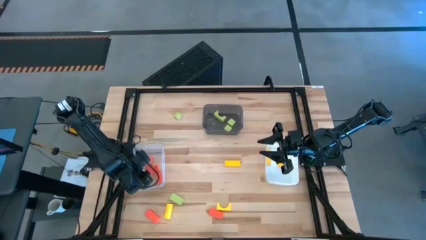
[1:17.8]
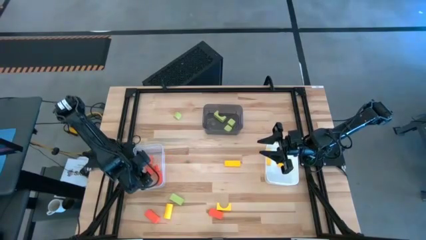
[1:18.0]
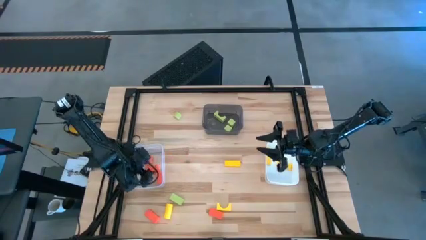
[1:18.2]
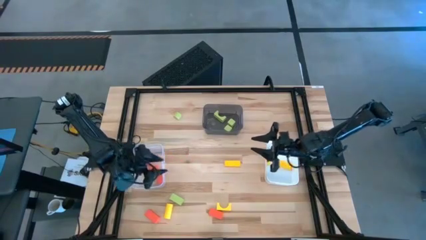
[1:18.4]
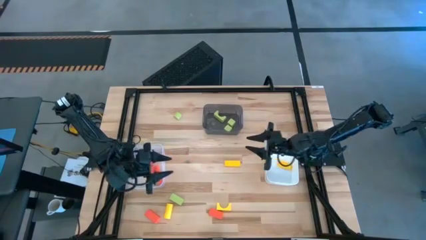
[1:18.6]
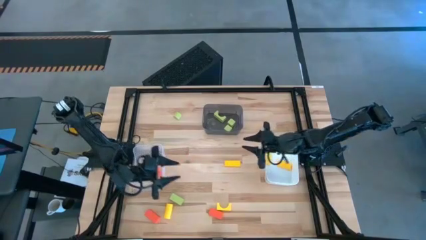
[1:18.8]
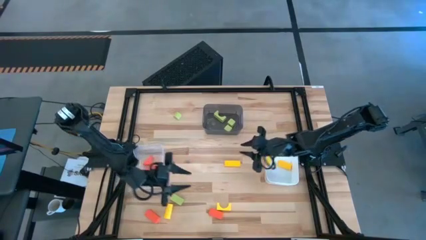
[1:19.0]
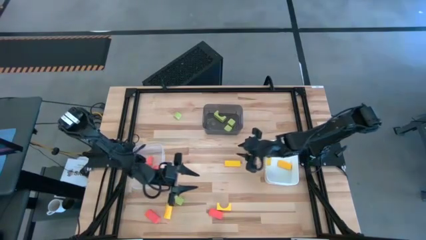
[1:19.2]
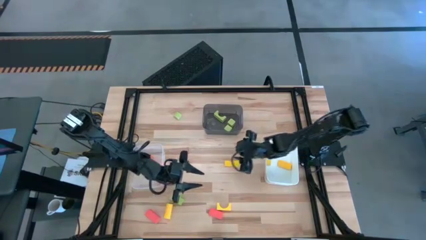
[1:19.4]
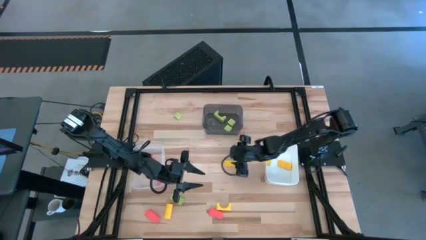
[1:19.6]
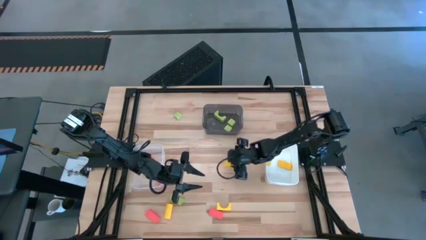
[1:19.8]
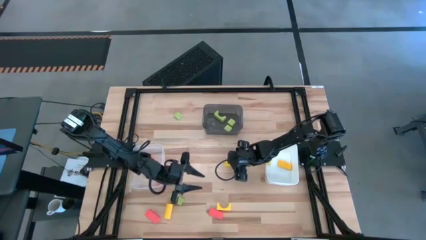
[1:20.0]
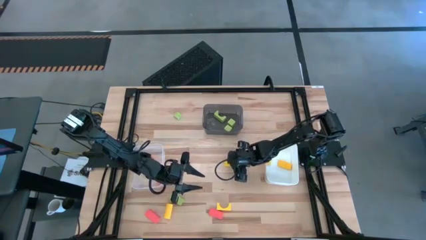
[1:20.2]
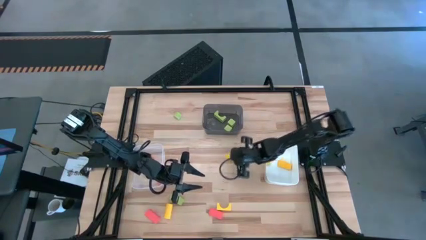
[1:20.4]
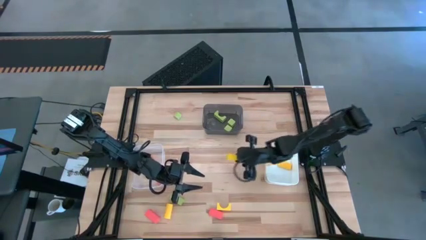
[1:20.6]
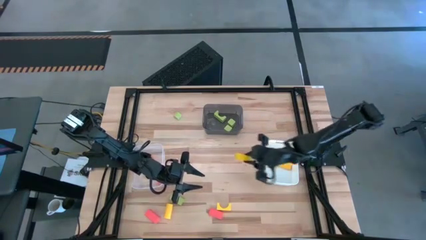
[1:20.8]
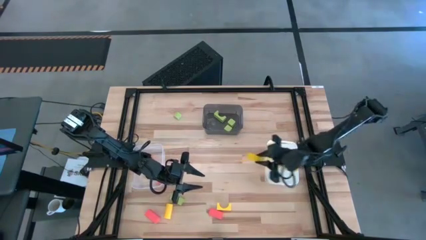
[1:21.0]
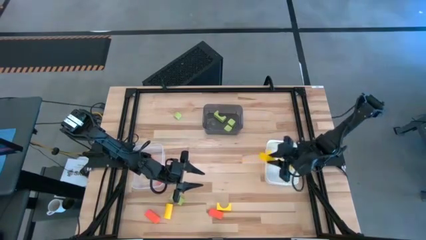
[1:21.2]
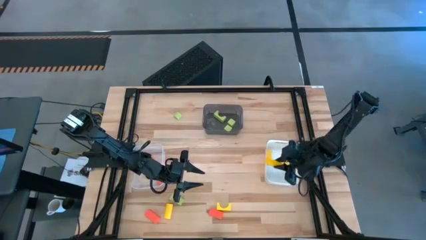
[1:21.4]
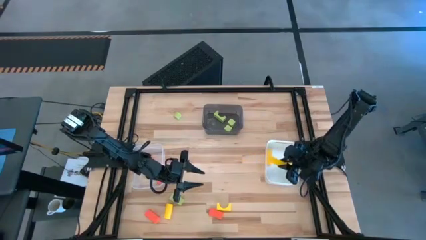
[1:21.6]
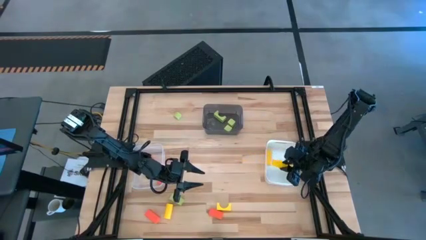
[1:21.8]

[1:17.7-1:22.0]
Task: Sort & place blocks by color
Put the yellow block into the white bin

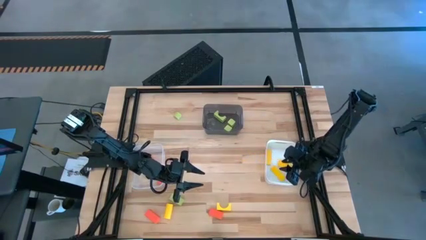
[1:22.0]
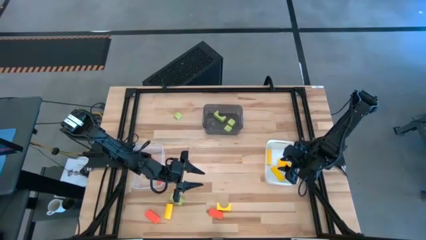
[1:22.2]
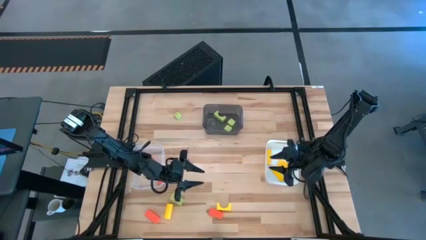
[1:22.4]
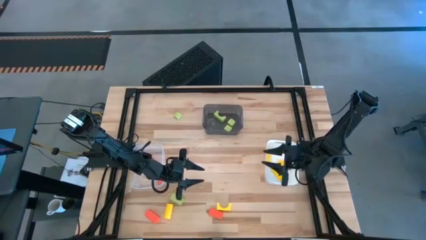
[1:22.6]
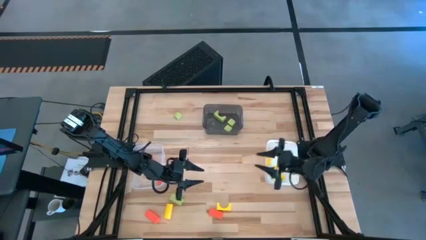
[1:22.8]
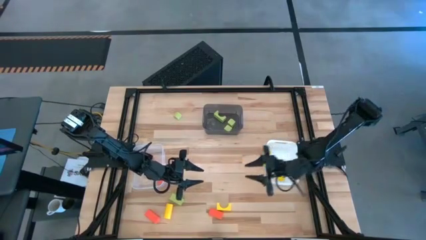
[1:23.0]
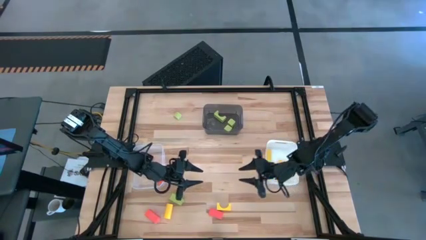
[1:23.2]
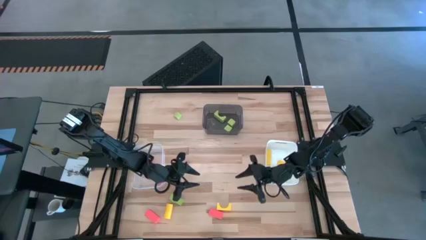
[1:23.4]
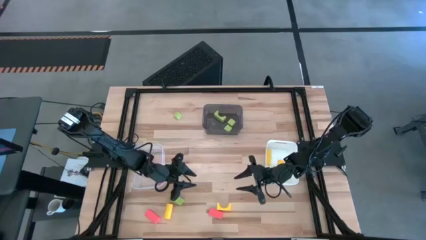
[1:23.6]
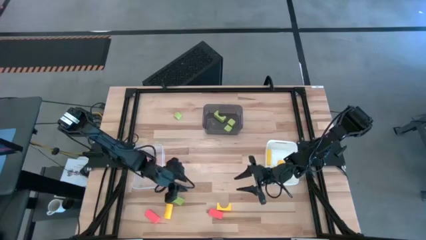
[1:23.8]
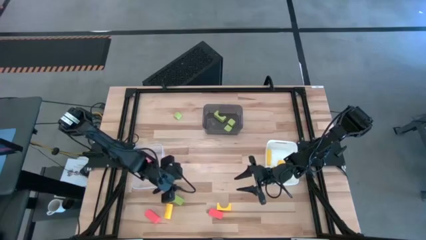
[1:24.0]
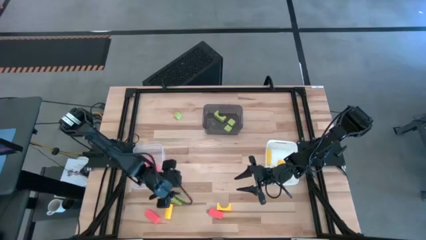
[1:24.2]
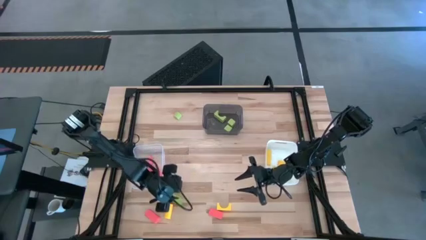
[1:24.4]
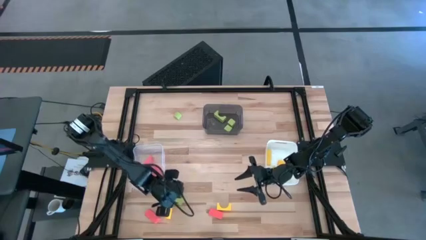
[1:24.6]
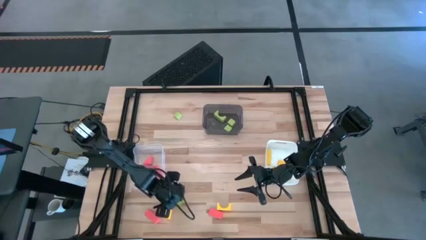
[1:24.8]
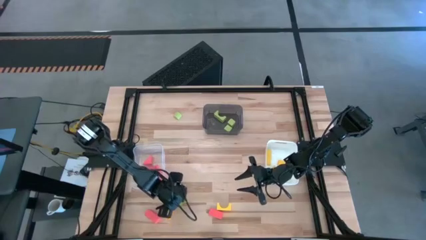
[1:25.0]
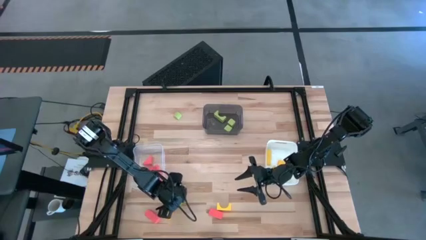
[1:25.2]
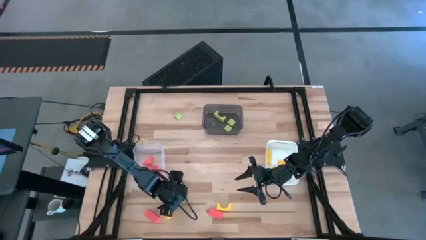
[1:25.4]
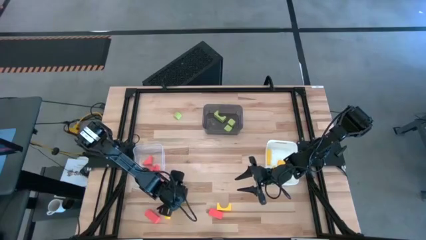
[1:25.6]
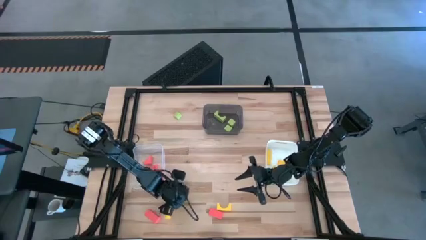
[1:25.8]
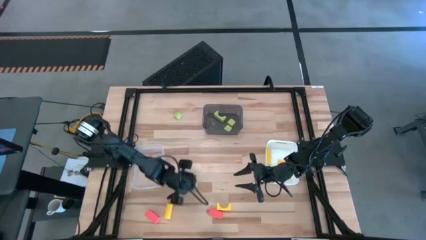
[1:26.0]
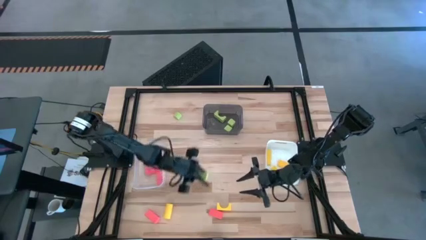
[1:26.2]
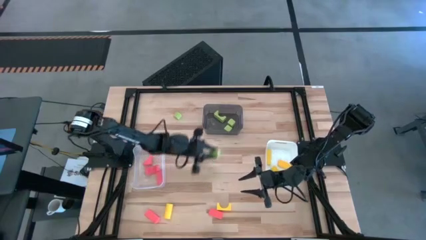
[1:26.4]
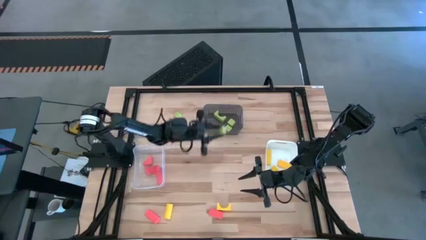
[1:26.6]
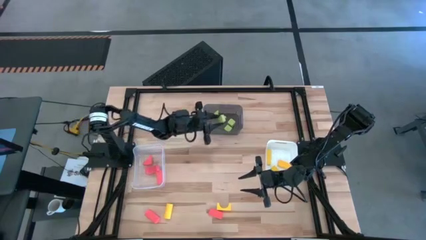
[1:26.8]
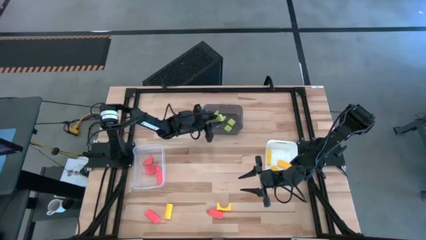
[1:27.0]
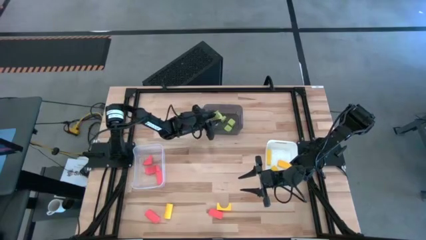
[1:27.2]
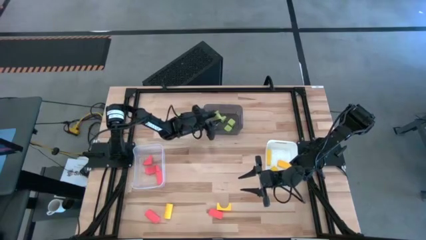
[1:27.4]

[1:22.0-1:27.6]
Put the green block into the black bin

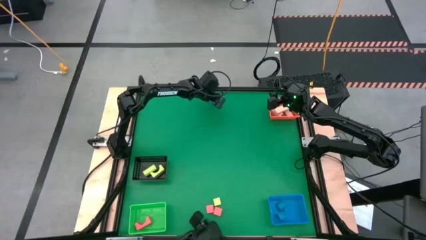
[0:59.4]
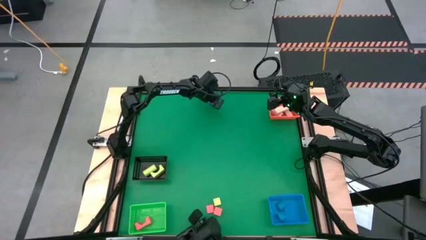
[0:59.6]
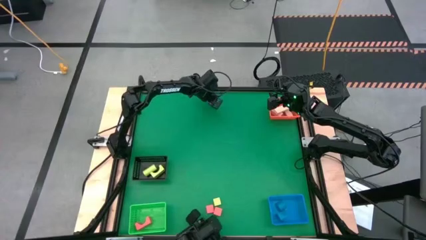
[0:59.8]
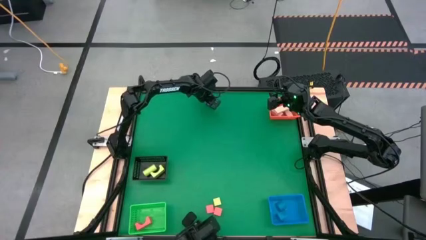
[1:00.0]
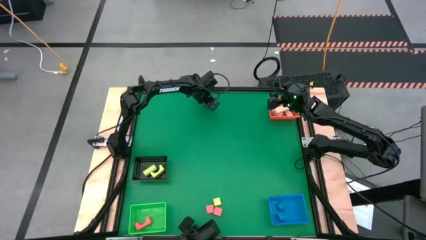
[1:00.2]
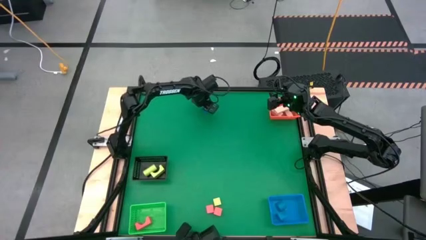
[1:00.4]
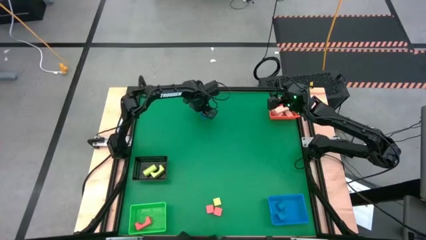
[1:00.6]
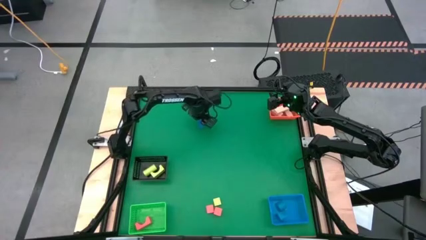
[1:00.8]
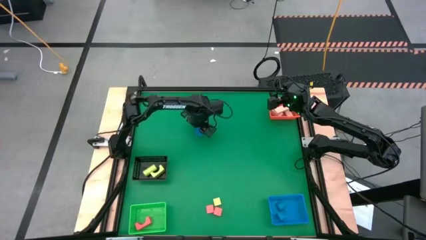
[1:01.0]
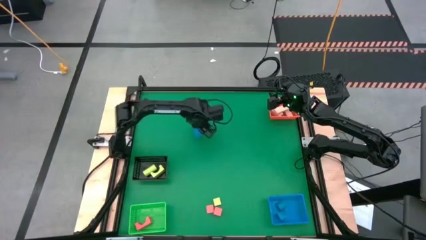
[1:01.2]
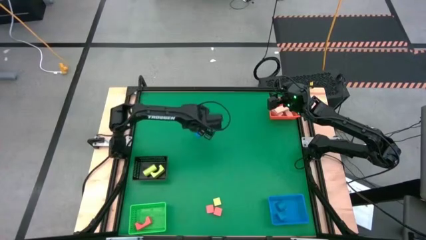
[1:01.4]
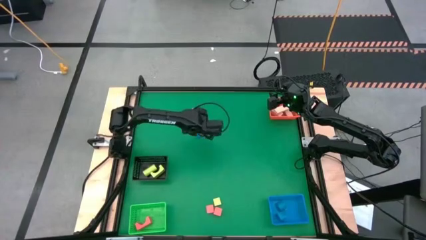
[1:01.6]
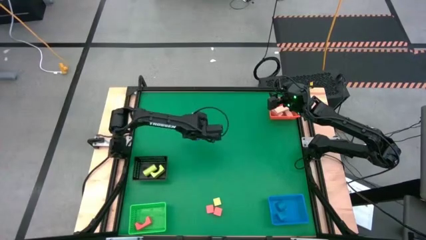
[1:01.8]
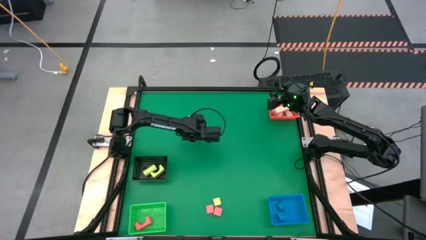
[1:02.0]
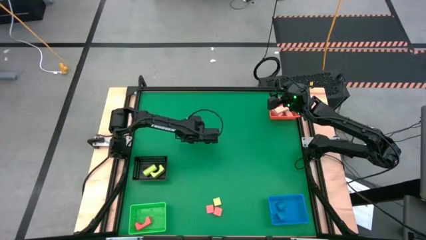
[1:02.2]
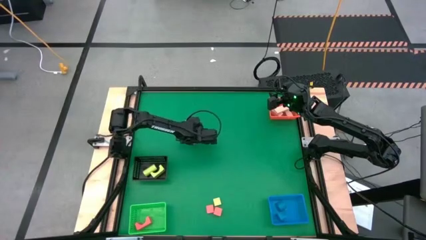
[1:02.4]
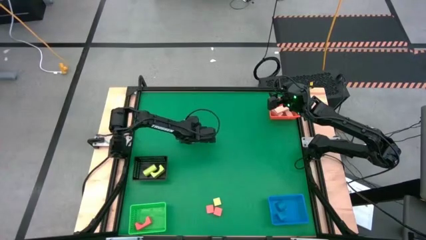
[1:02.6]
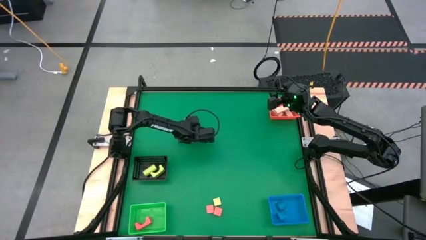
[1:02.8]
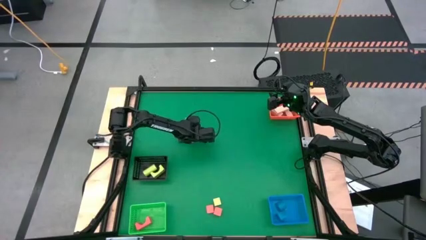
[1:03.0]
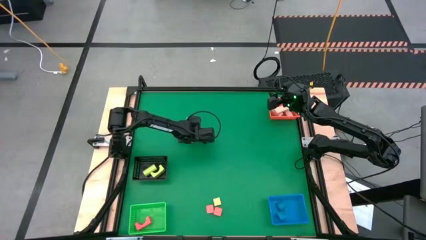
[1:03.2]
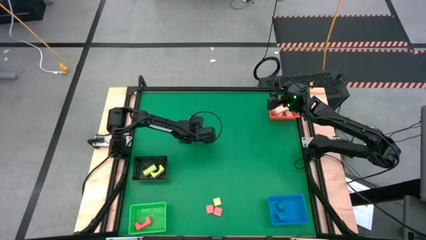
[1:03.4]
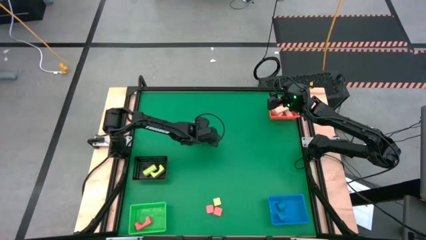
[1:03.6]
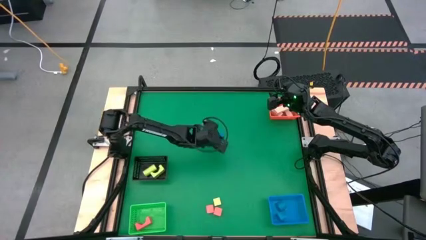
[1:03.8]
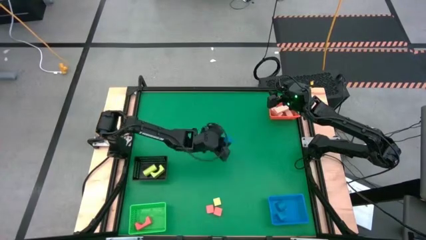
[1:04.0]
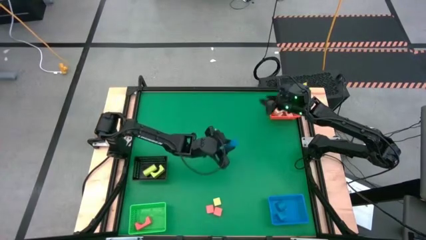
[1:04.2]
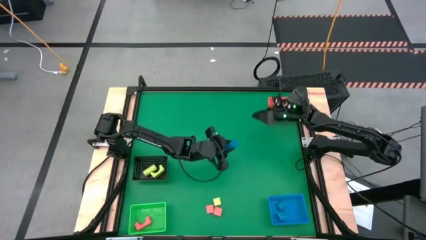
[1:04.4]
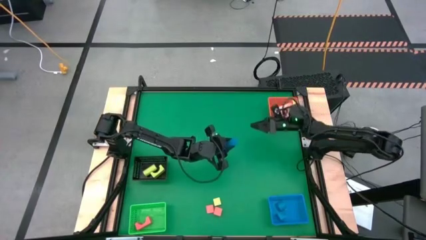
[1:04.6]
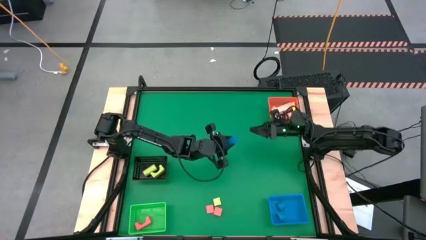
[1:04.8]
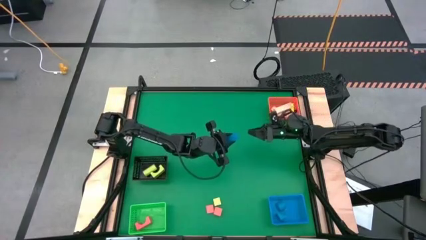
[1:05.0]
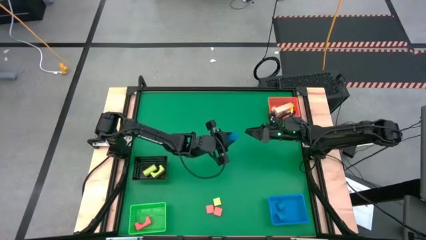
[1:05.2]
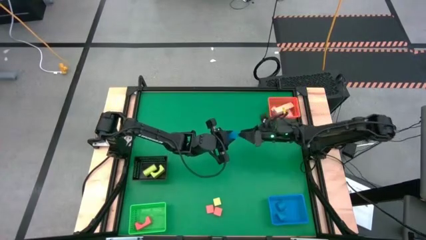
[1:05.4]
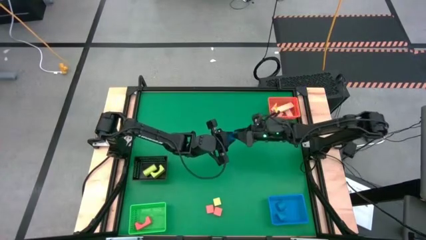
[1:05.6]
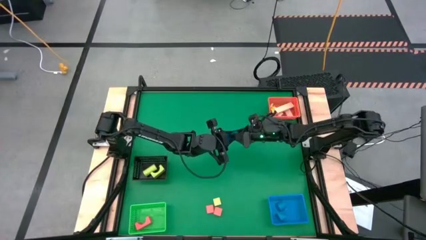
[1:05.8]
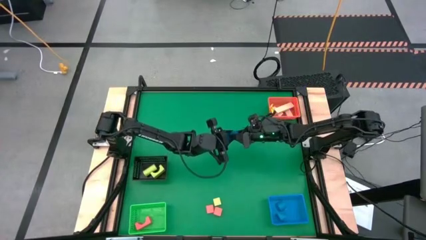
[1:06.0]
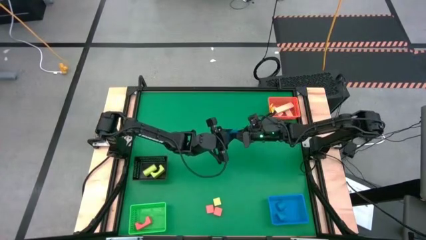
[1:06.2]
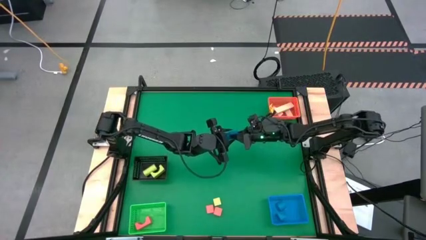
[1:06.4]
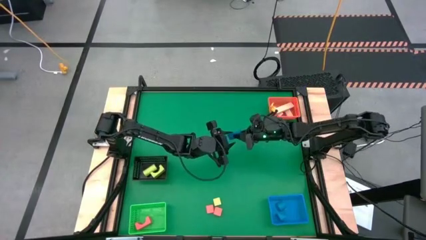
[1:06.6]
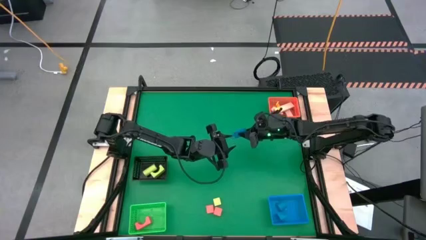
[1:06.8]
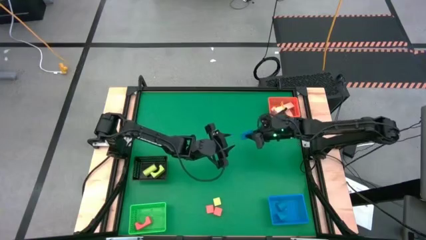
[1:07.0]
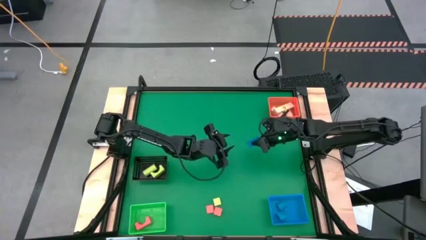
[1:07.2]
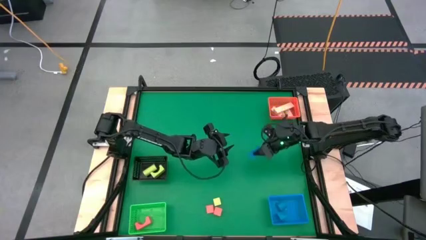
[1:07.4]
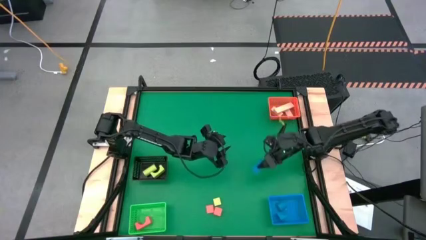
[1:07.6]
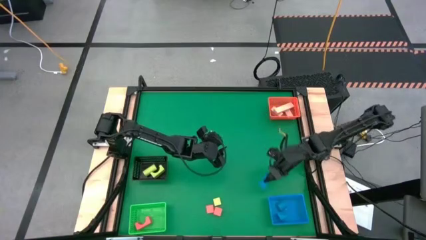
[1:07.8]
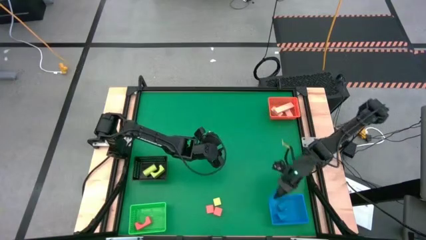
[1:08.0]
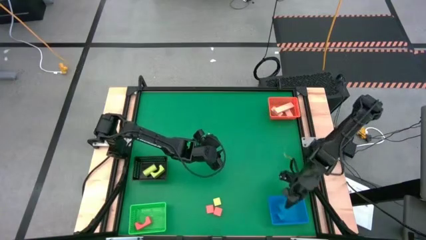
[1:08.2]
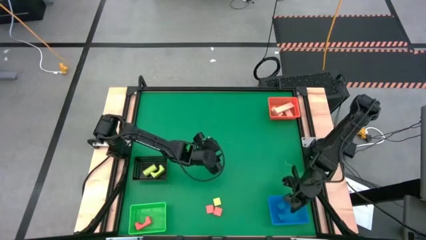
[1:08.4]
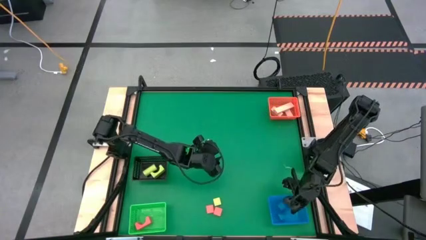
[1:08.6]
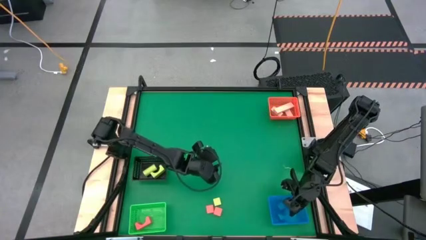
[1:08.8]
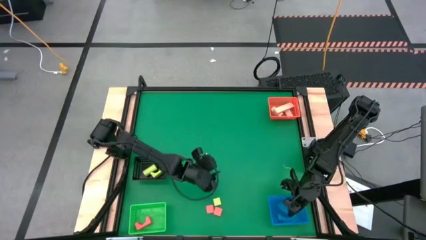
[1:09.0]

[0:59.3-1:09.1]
Task: Sort & place blocks by color
Put the blue wooden block into the blue basket
